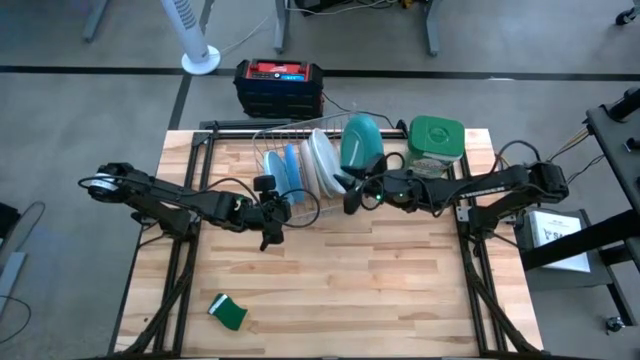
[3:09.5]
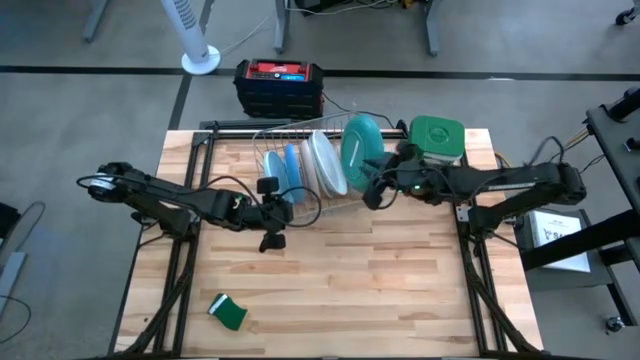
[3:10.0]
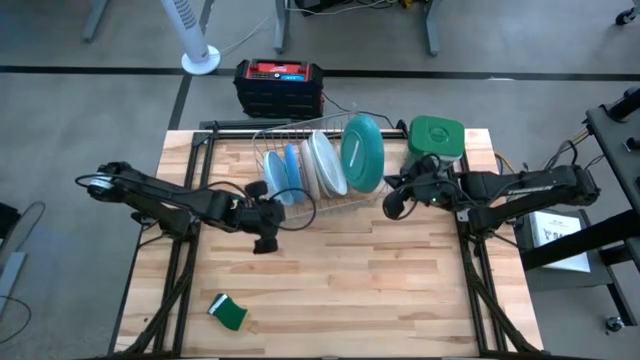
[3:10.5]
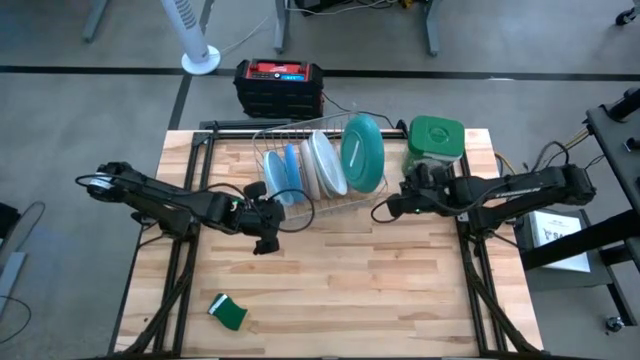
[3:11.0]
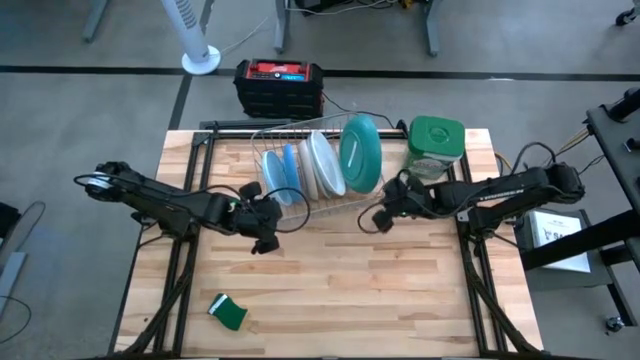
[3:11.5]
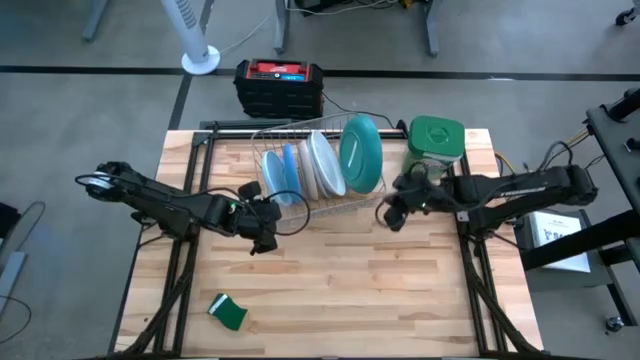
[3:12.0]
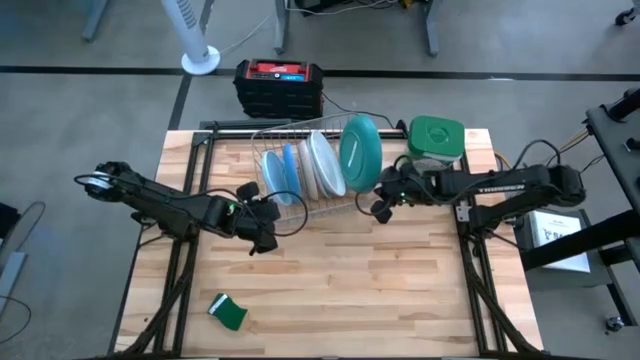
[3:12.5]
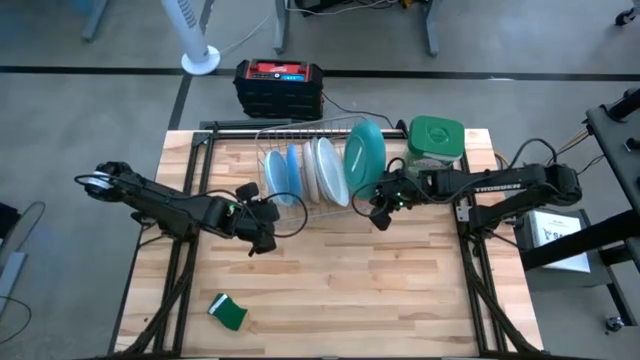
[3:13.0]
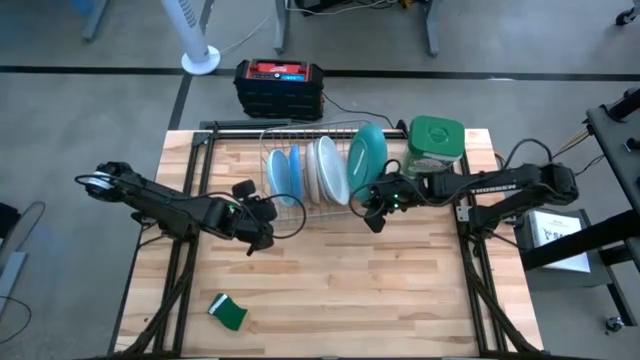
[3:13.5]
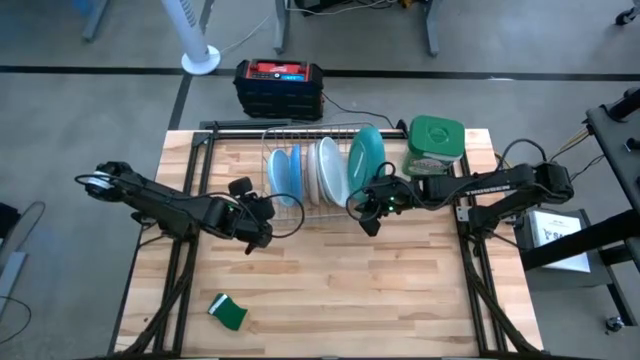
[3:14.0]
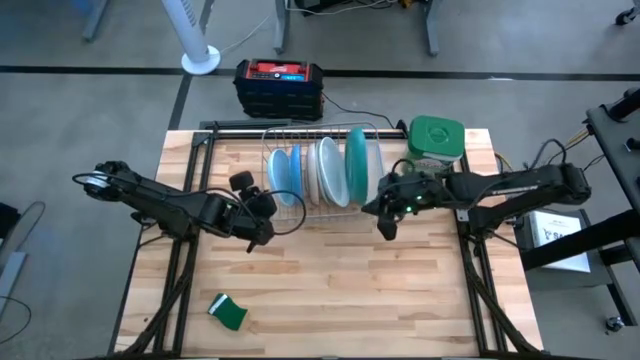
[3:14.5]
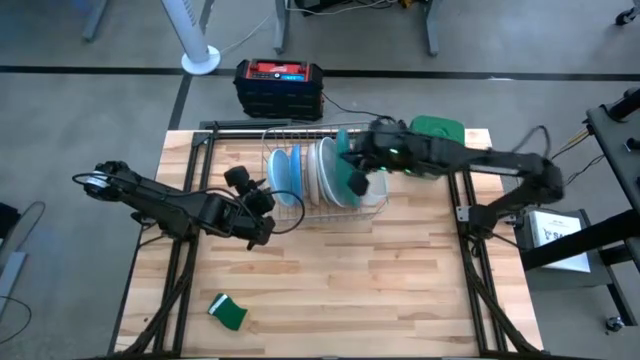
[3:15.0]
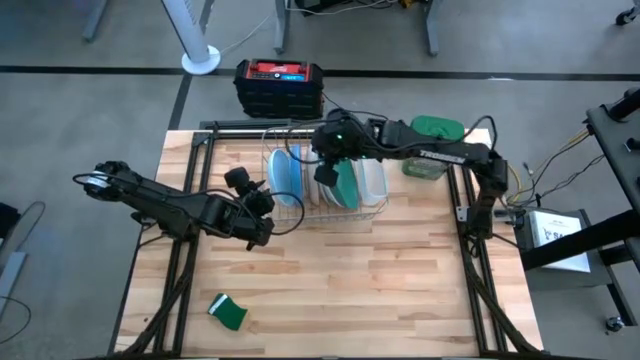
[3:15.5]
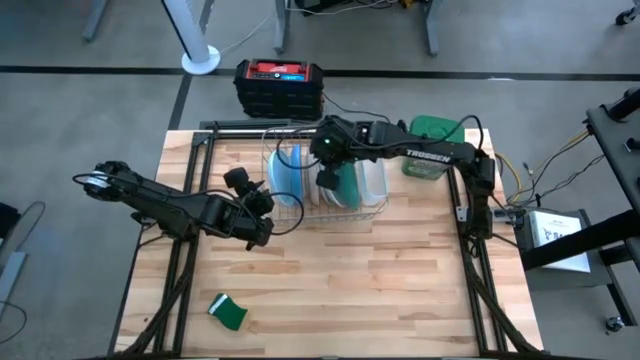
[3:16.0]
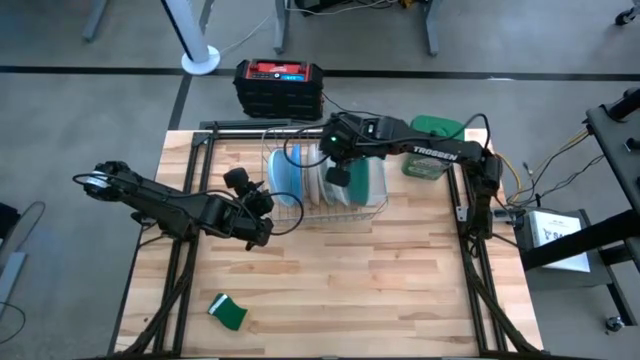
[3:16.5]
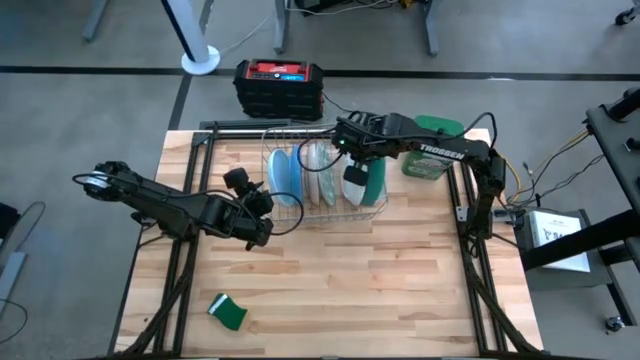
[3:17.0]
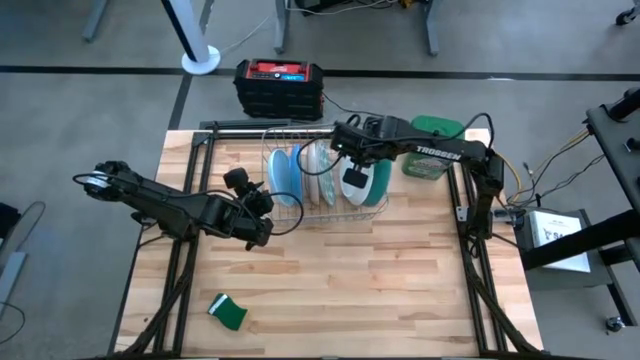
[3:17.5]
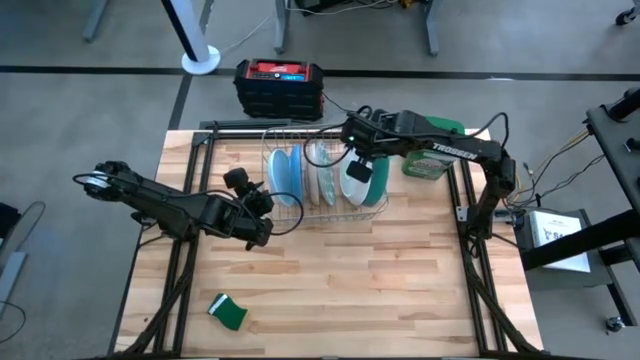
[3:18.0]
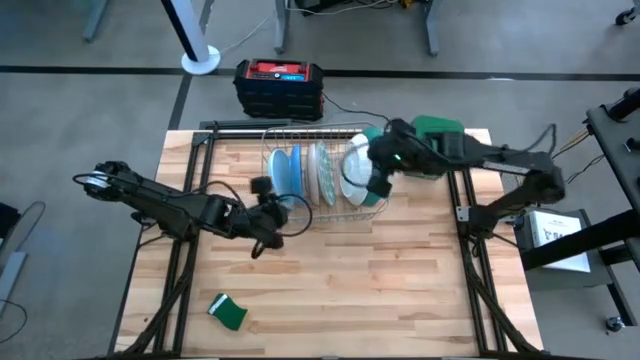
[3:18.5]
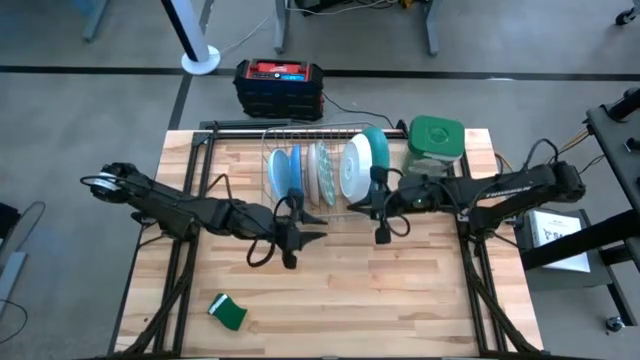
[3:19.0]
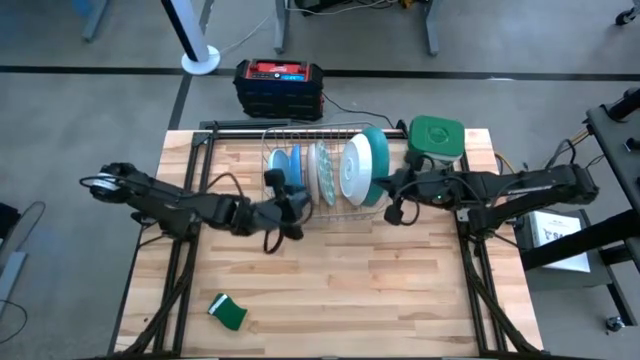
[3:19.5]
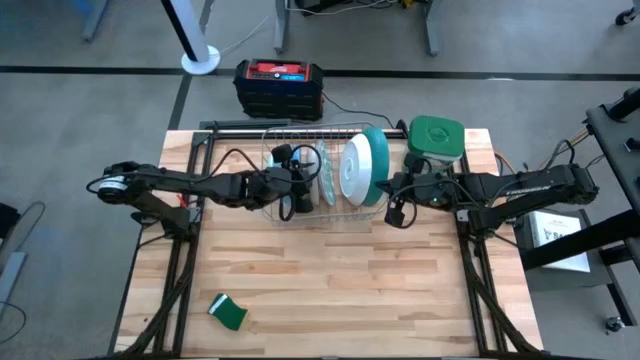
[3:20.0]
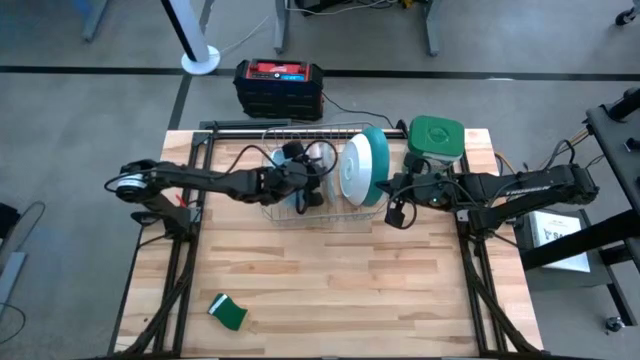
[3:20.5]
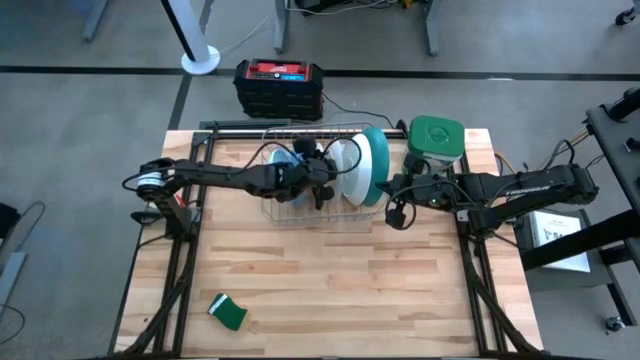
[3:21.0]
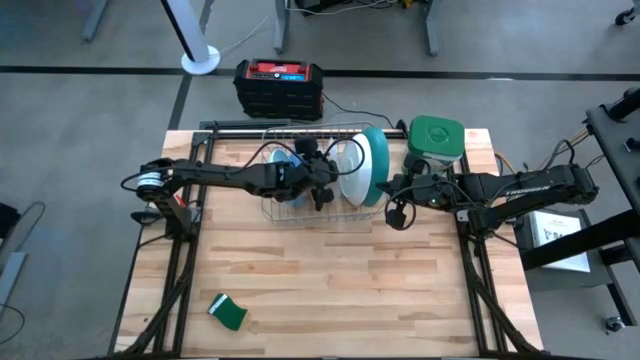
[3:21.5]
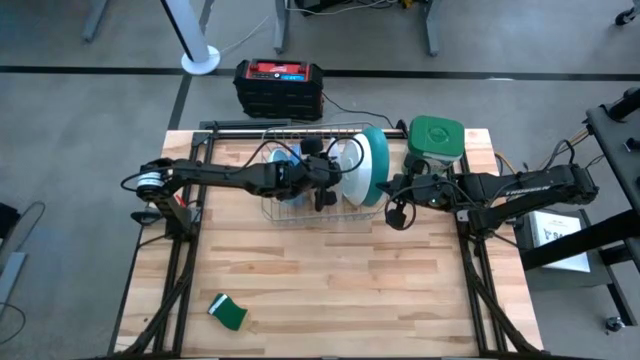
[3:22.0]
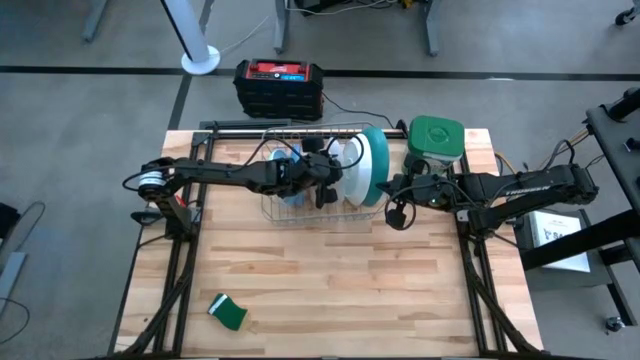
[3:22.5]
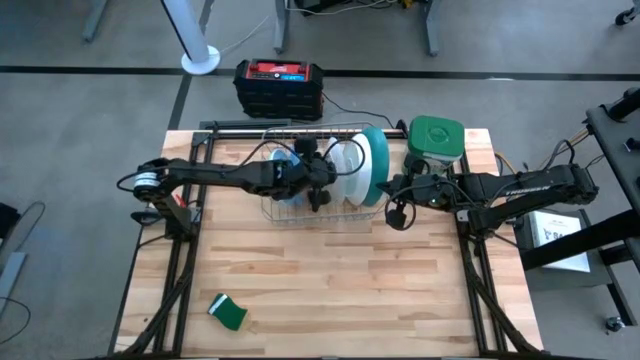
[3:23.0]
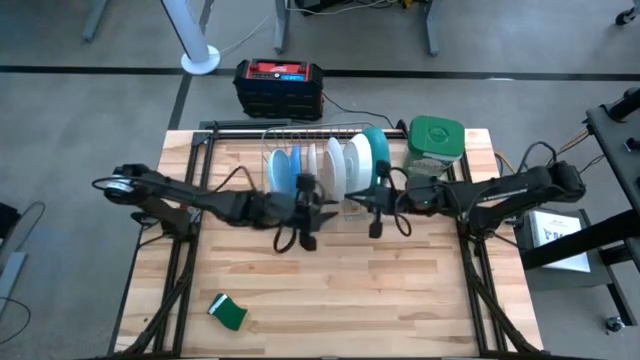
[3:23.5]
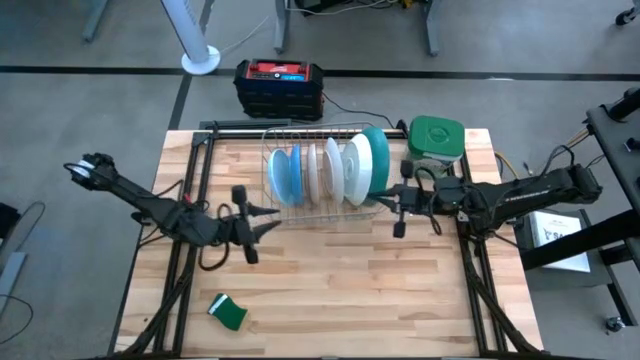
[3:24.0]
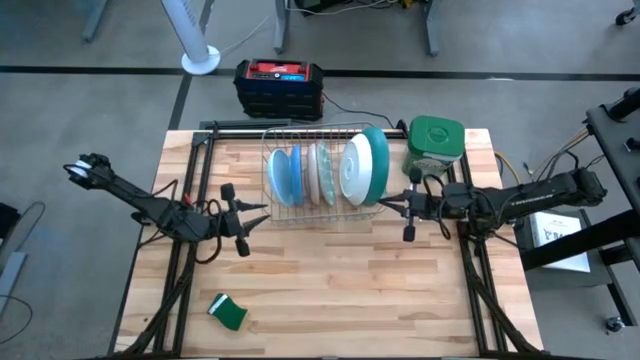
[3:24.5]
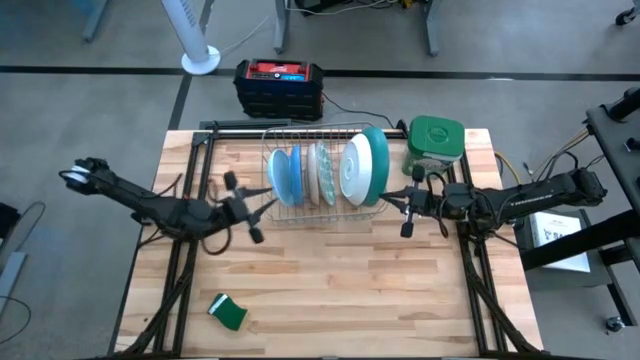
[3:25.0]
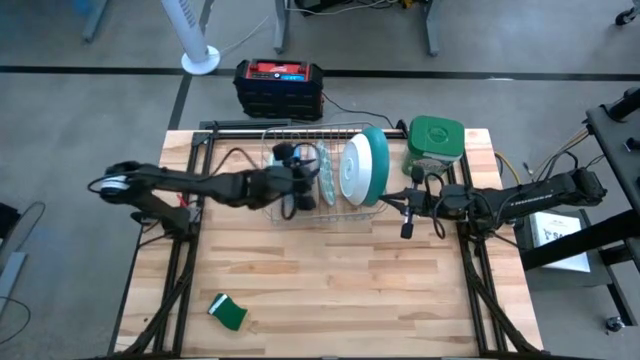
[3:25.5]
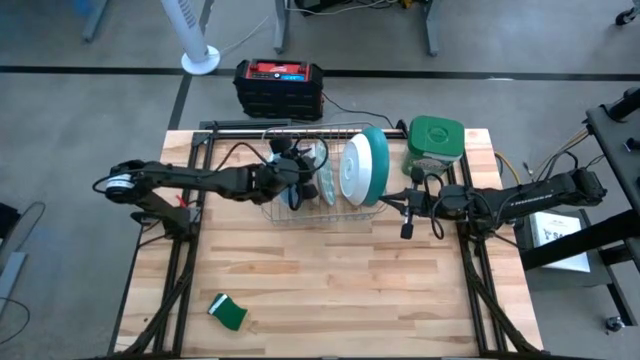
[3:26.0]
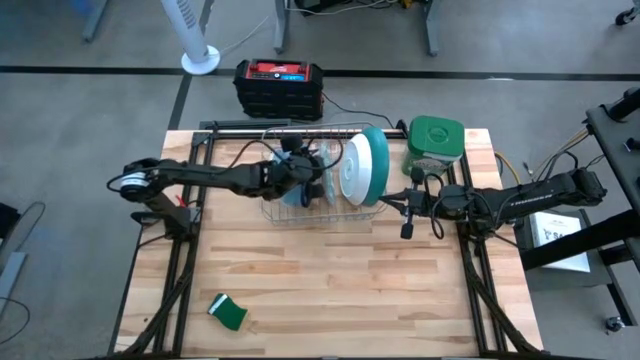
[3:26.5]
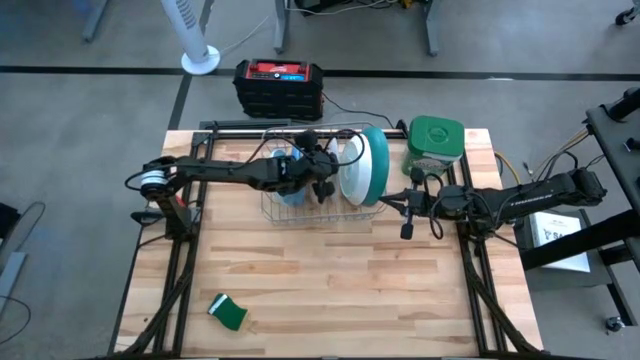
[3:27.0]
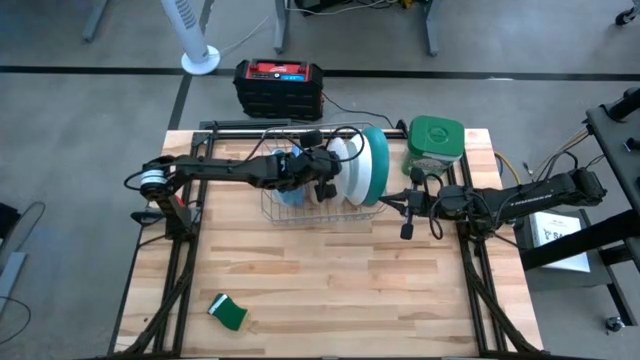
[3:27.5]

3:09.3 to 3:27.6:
Task: Sort dishes
Adjust the plates on the dish rack
